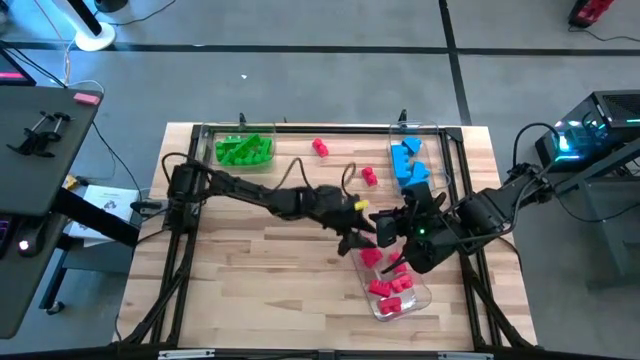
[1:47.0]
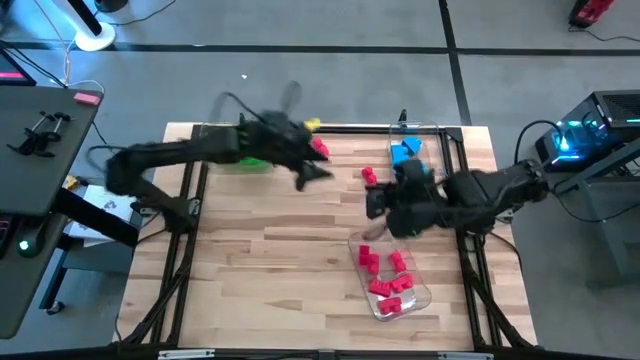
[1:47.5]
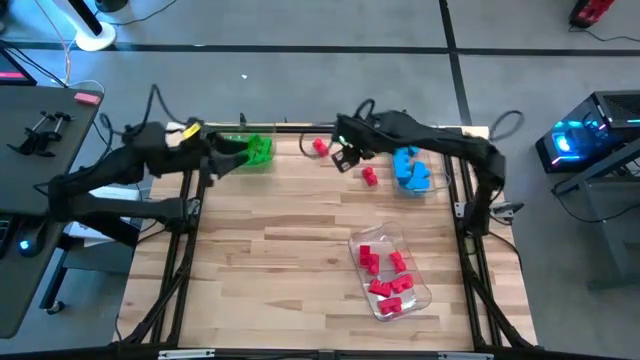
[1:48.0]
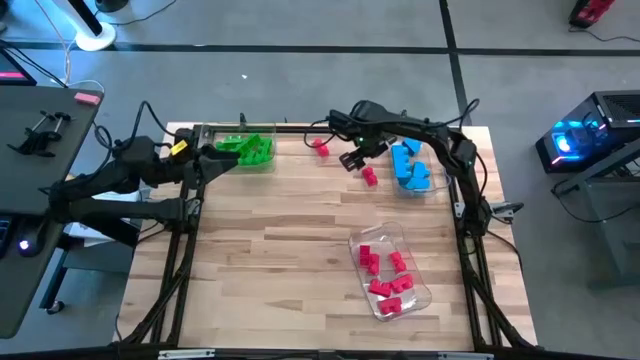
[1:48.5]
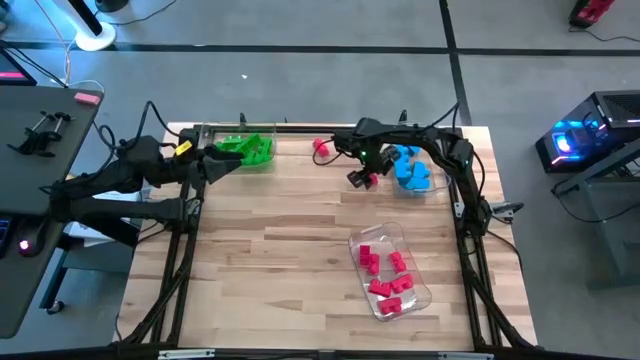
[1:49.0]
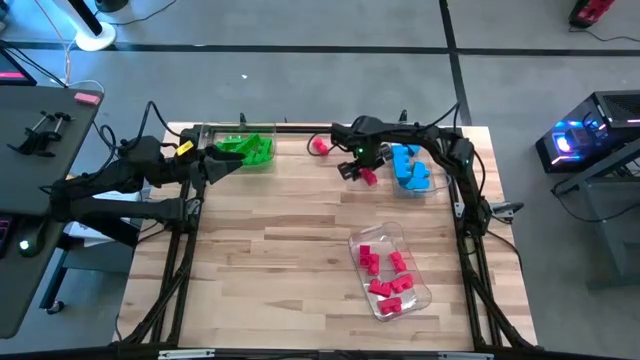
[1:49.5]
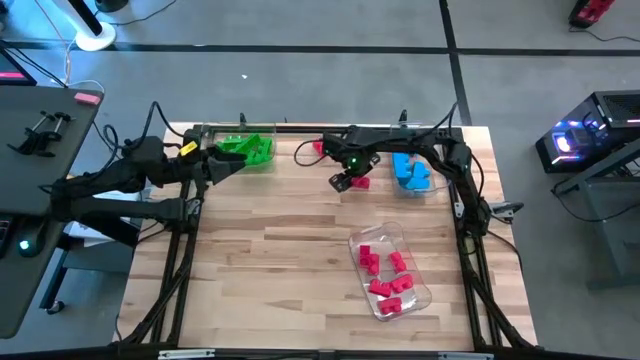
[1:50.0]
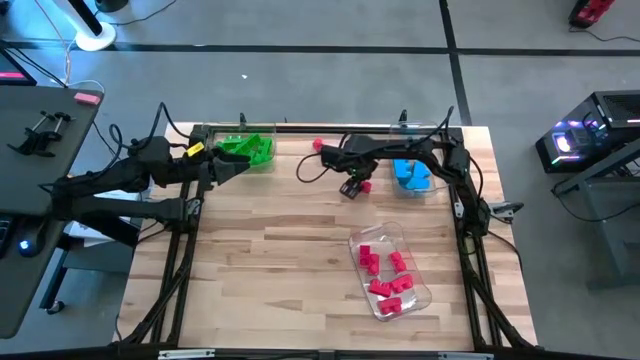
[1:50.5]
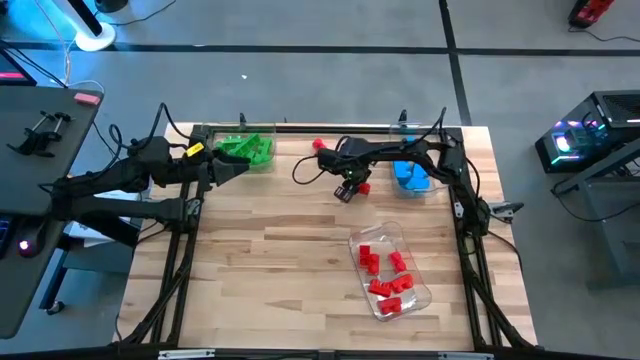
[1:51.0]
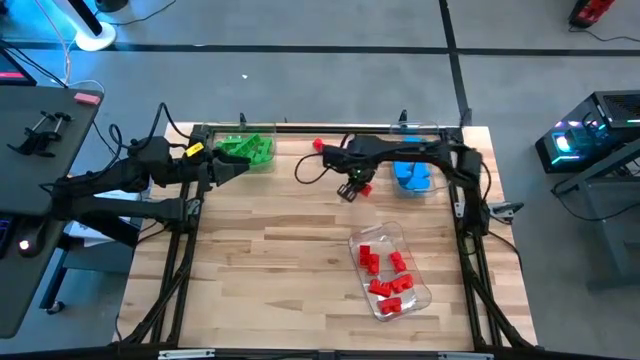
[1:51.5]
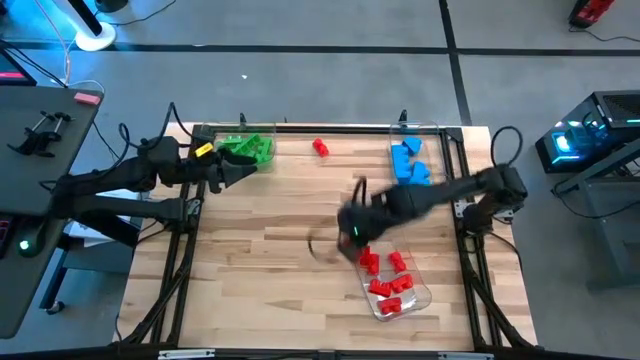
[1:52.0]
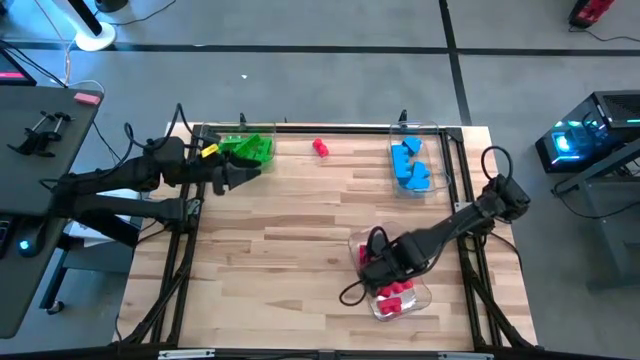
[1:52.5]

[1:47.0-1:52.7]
Task: Sort blocks
Put the red game piece into the bottom transparent bin

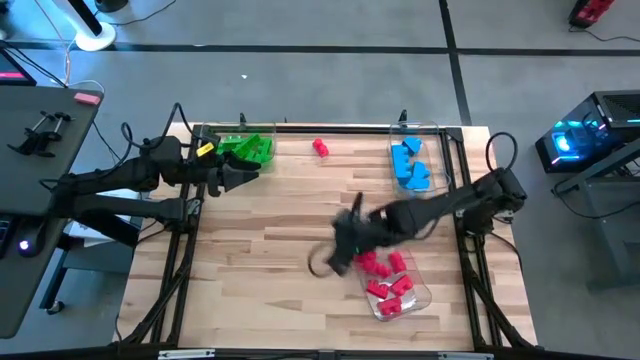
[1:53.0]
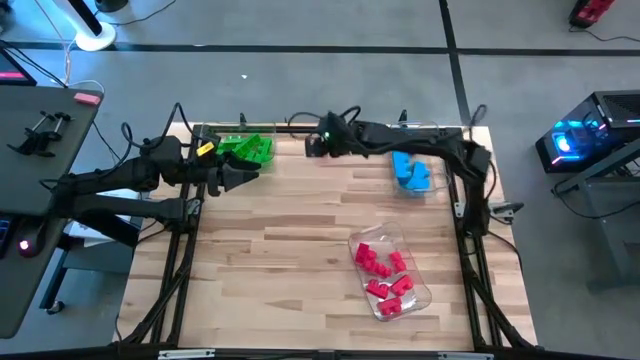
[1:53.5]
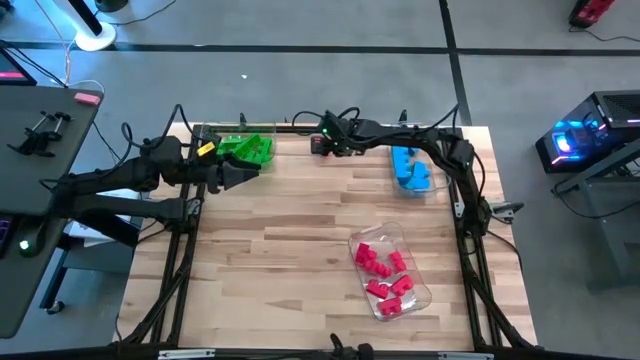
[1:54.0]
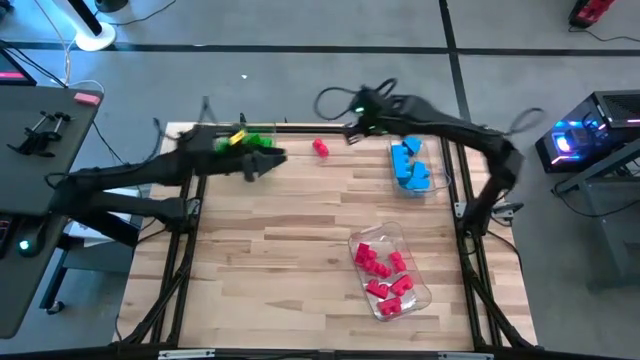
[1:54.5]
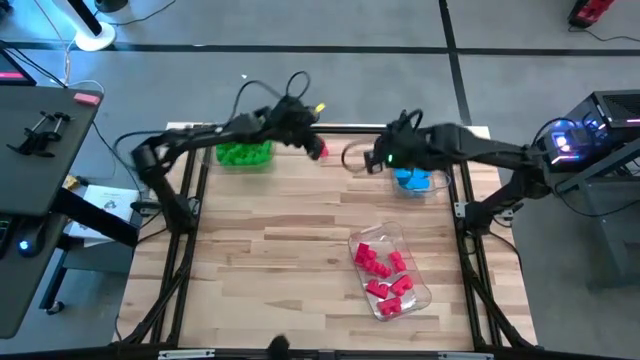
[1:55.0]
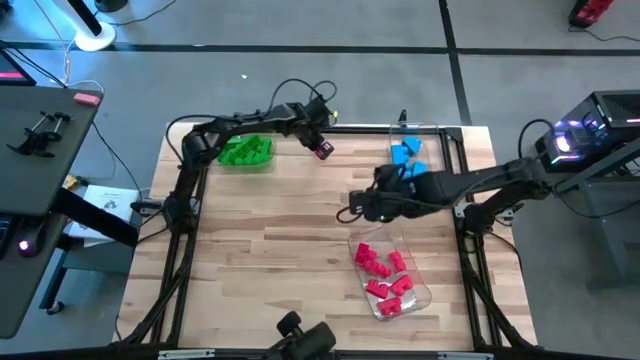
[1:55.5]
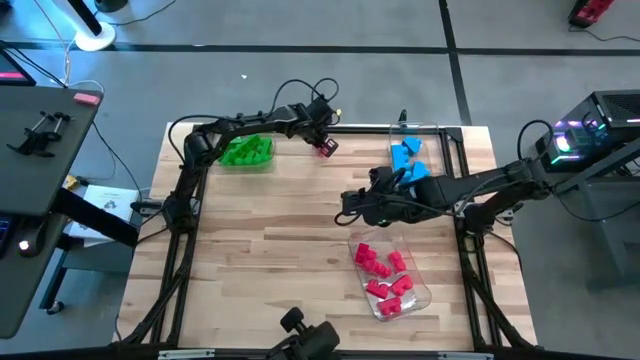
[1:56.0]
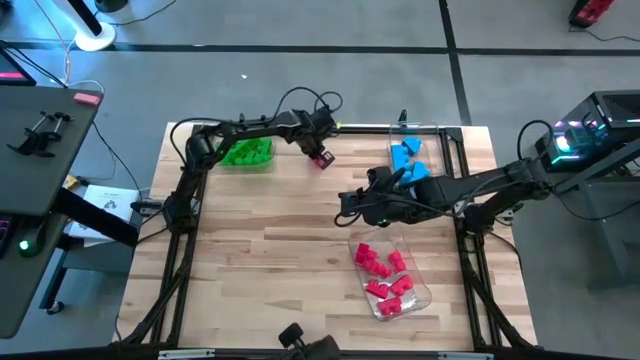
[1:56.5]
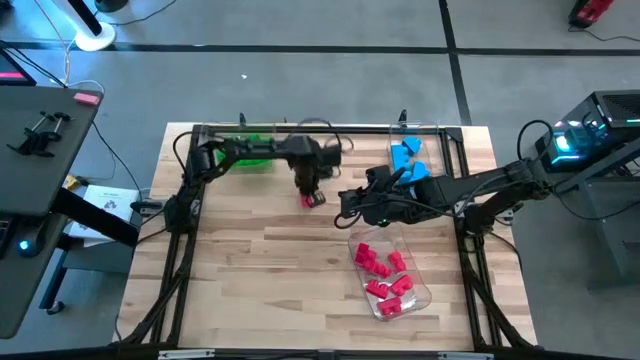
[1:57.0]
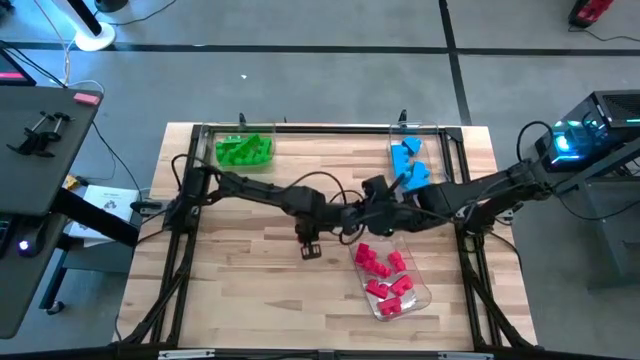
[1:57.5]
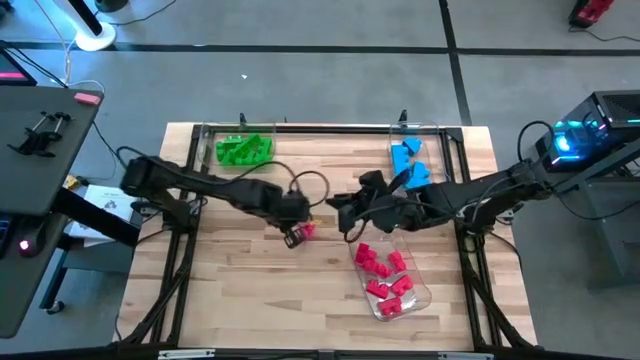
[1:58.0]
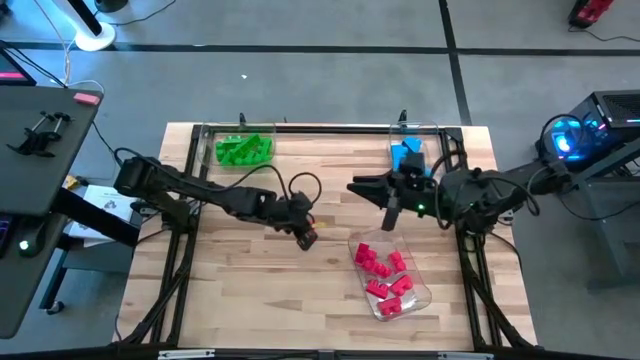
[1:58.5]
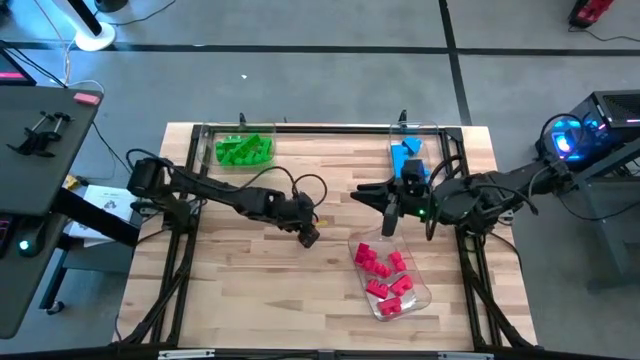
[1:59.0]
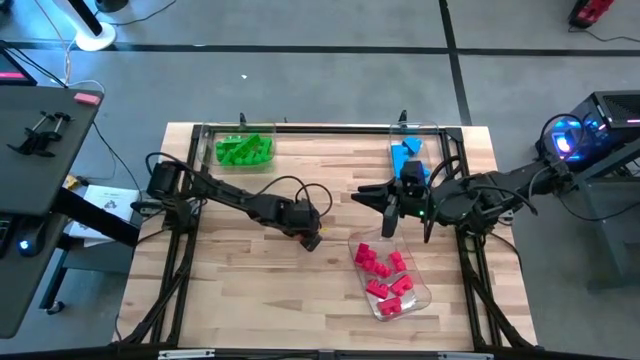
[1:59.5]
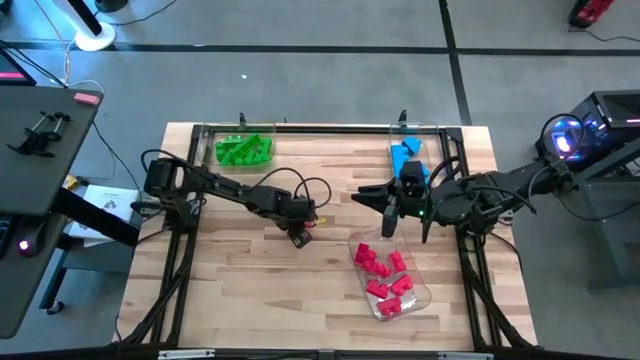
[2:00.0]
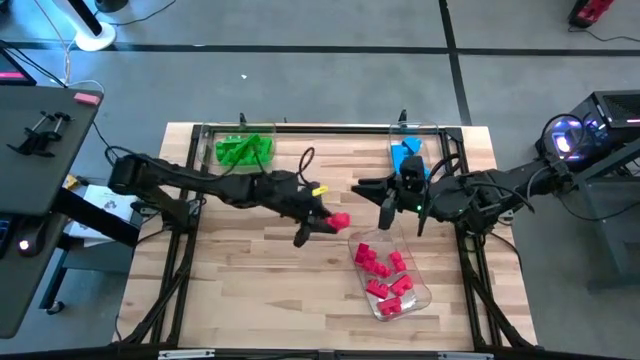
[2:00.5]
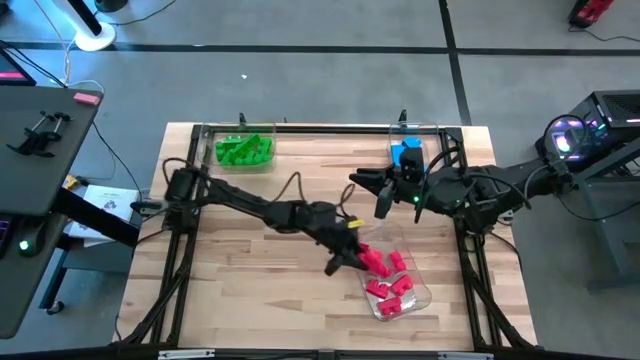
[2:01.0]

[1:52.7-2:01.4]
Put the red game piece into the bottom transparent bin

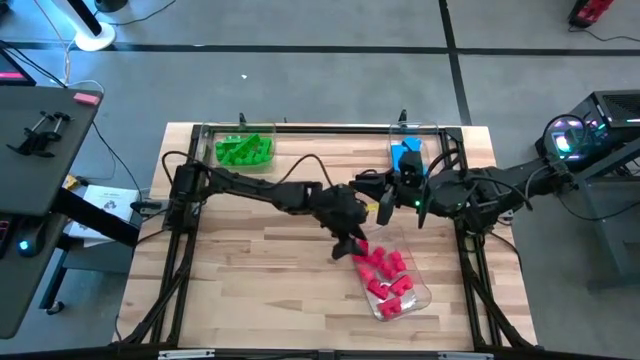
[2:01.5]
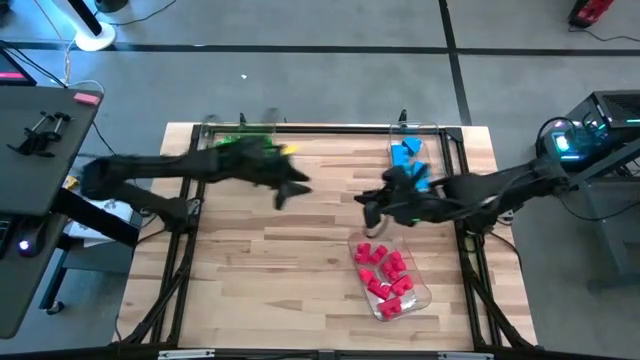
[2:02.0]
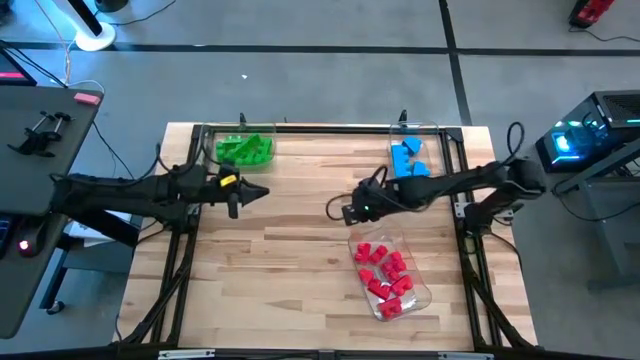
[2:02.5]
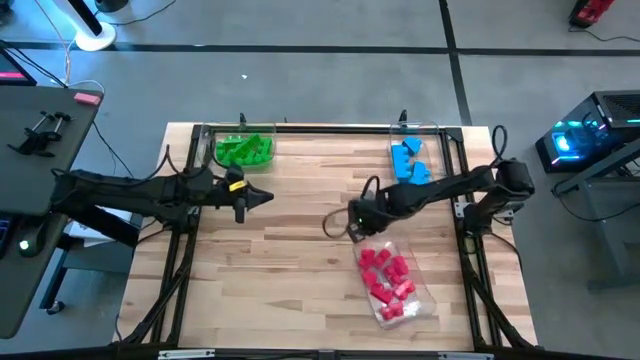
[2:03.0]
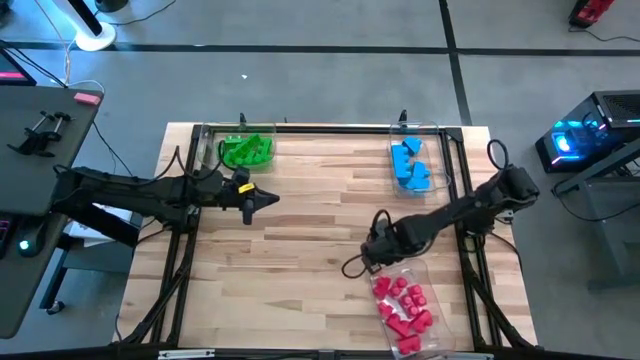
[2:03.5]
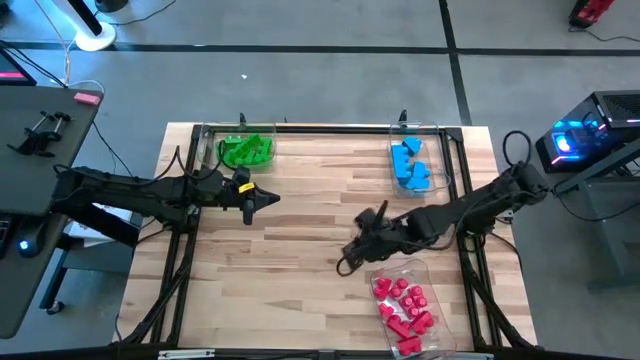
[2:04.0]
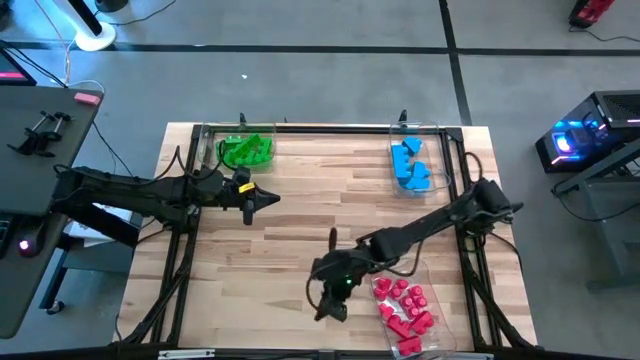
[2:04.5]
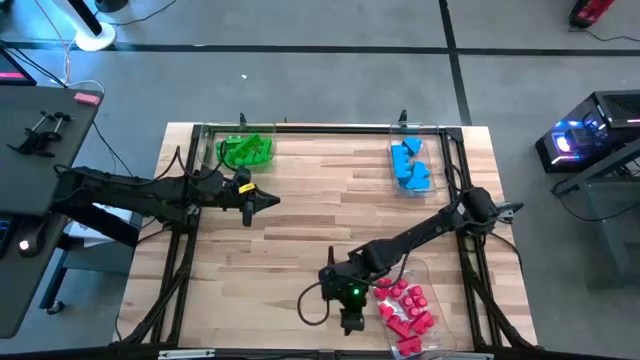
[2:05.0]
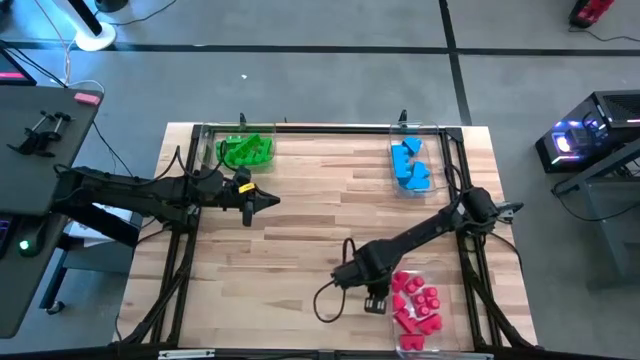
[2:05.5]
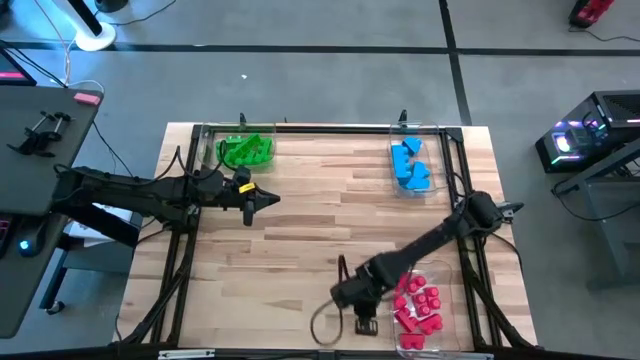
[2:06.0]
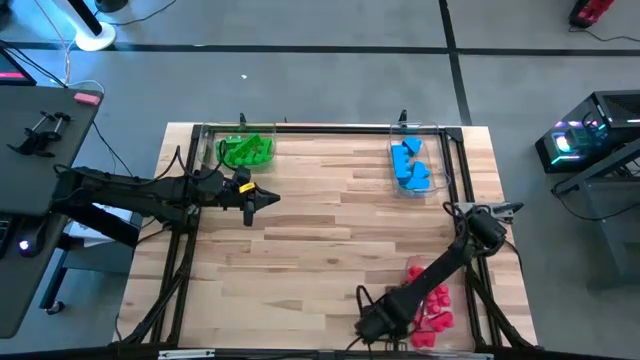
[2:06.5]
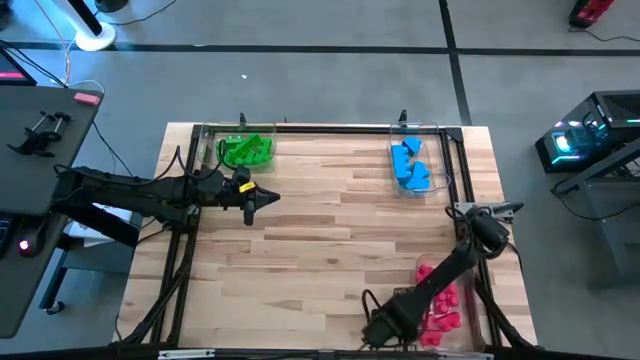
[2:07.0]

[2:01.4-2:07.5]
Adjust the bottom transparent bin

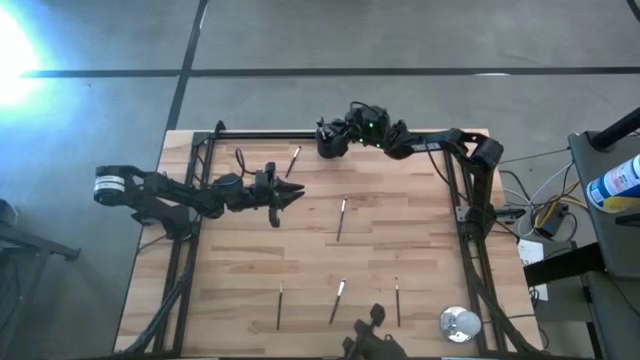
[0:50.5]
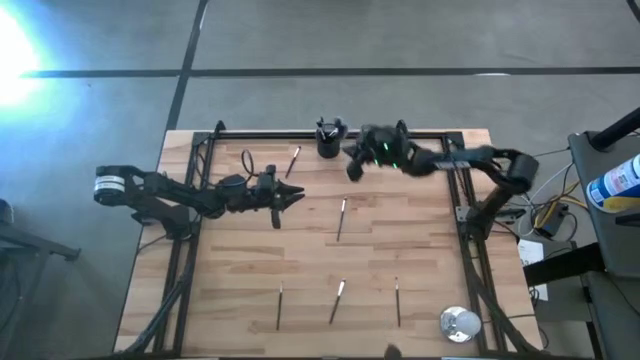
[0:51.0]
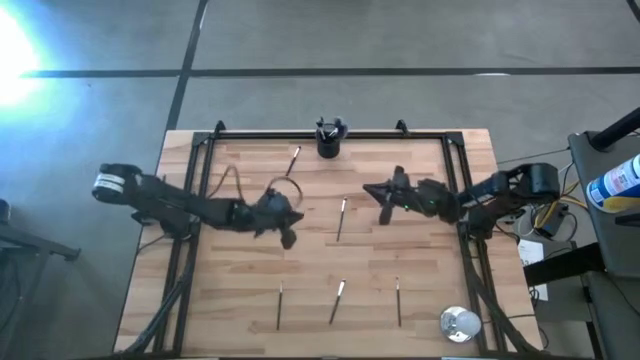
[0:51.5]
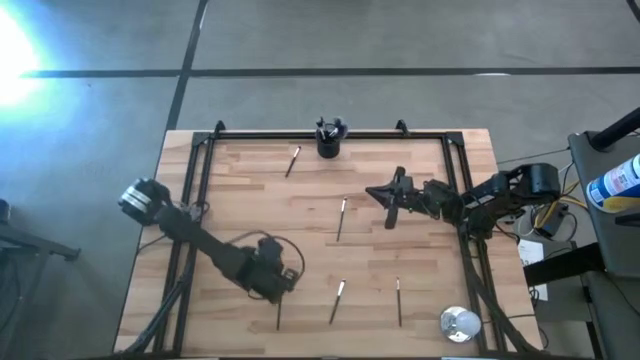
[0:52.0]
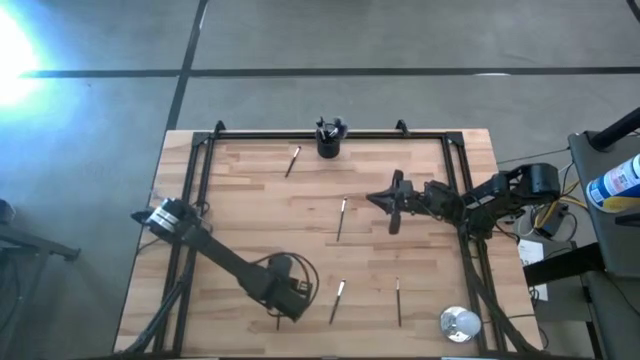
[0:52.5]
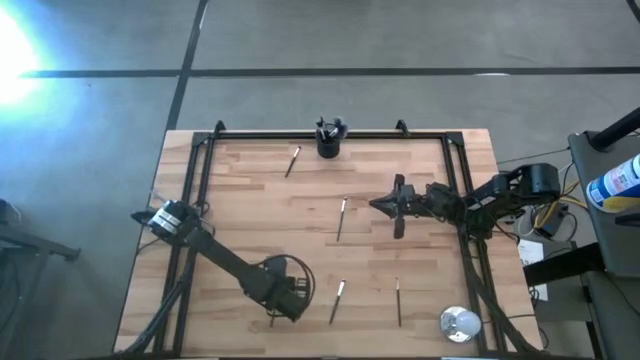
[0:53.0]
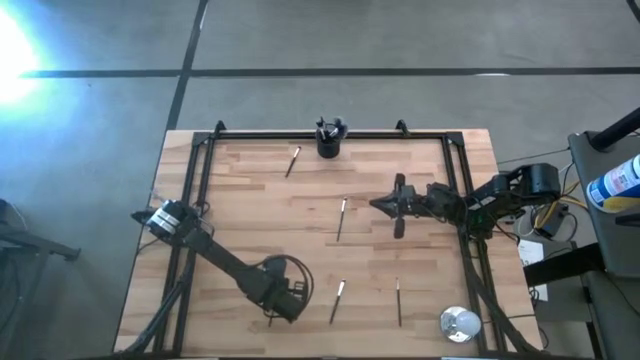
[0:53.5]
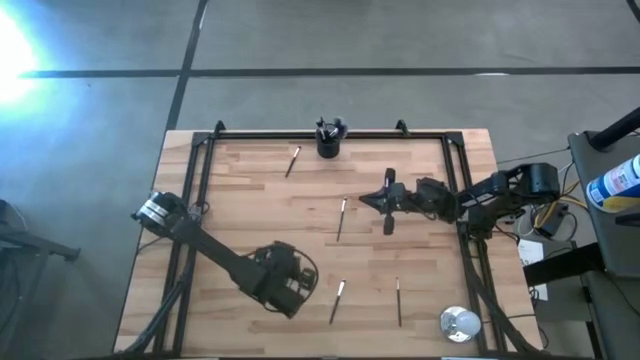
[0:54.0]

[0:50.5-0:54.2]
Task: Put items in baskets/containers
Put the black liner brush into the black pen holder
